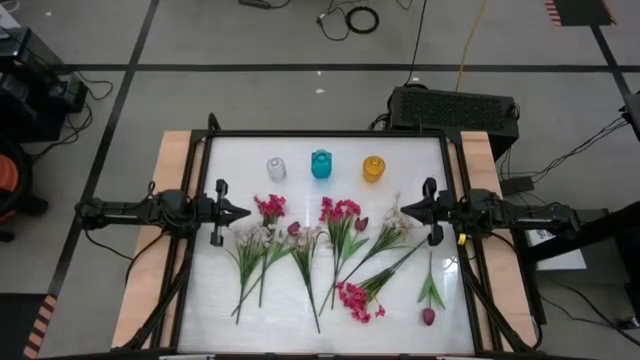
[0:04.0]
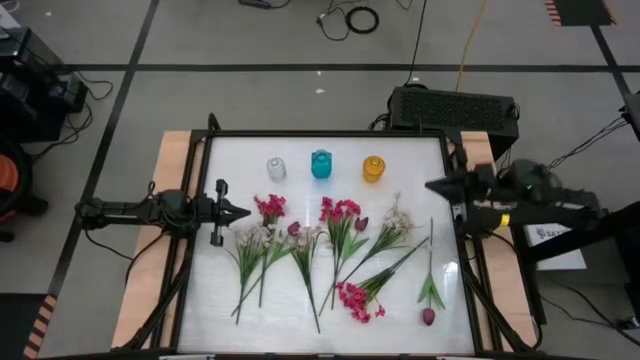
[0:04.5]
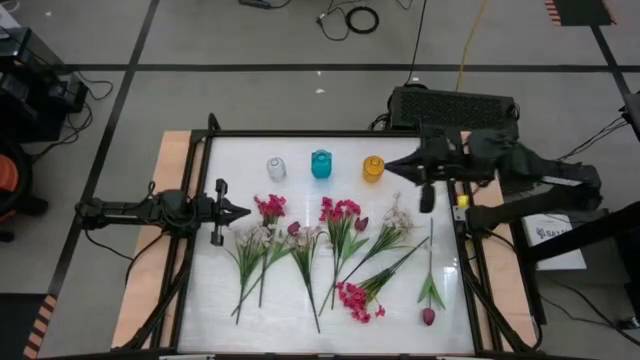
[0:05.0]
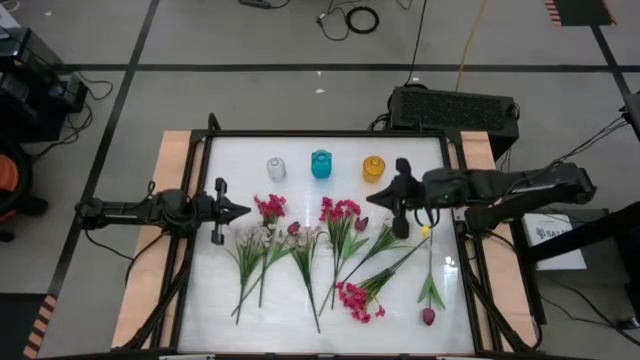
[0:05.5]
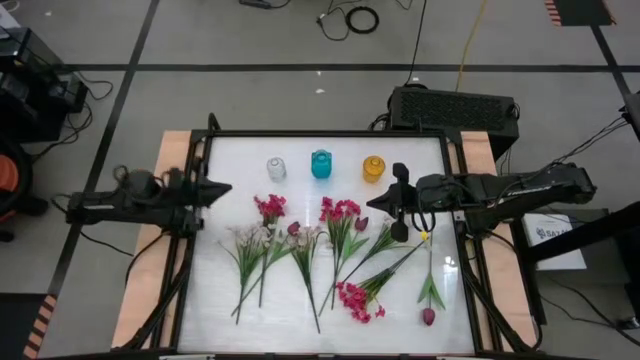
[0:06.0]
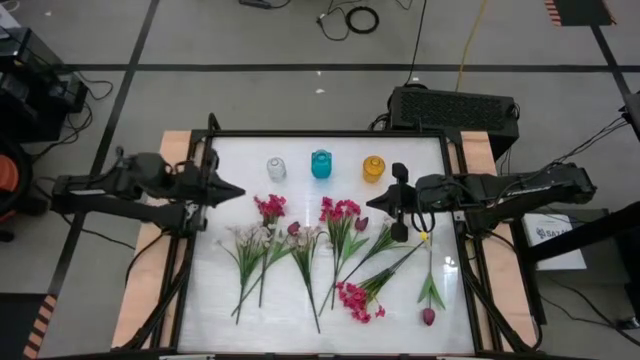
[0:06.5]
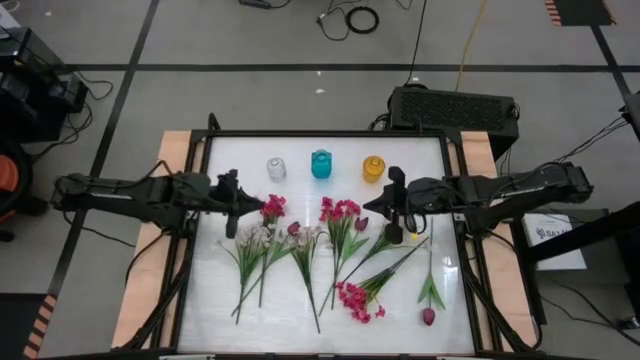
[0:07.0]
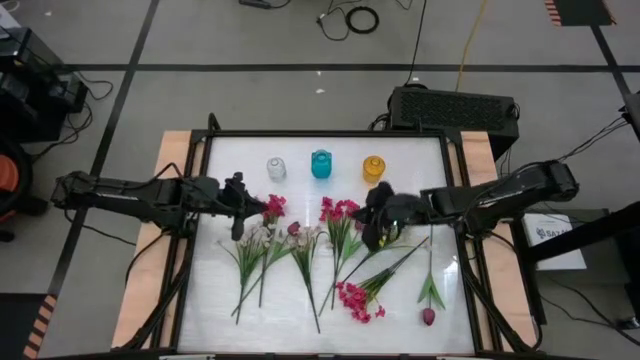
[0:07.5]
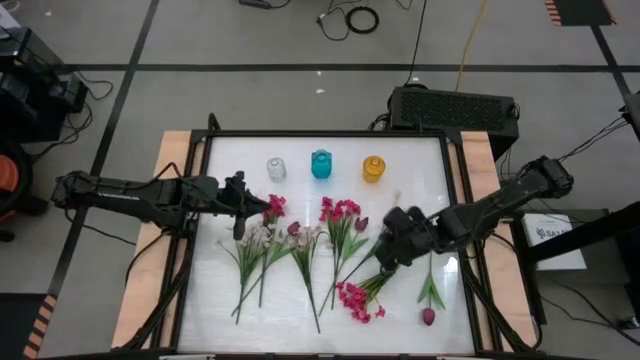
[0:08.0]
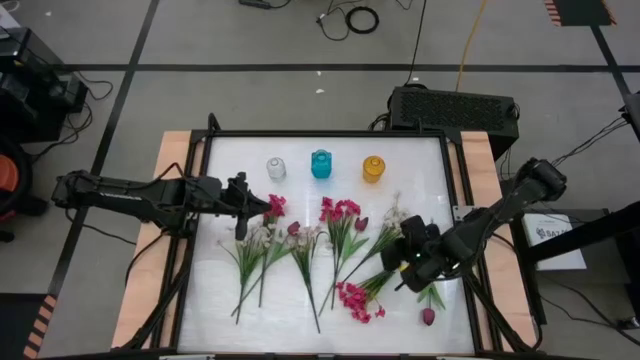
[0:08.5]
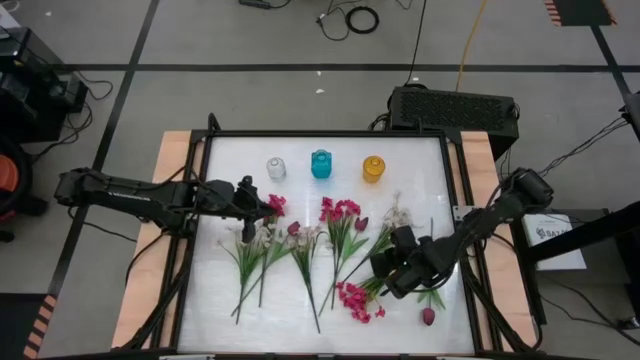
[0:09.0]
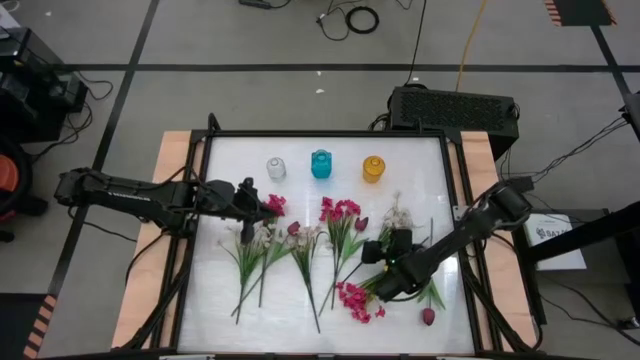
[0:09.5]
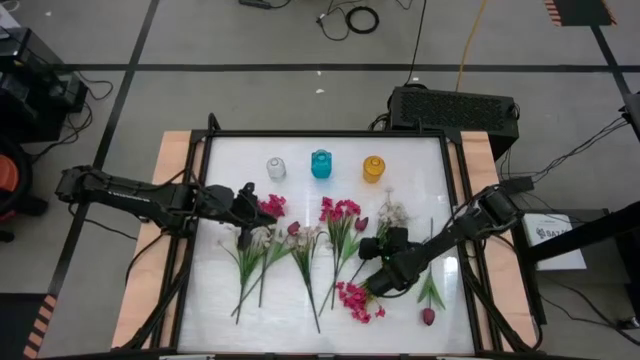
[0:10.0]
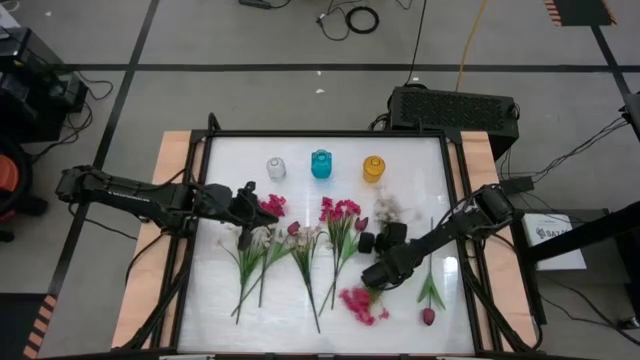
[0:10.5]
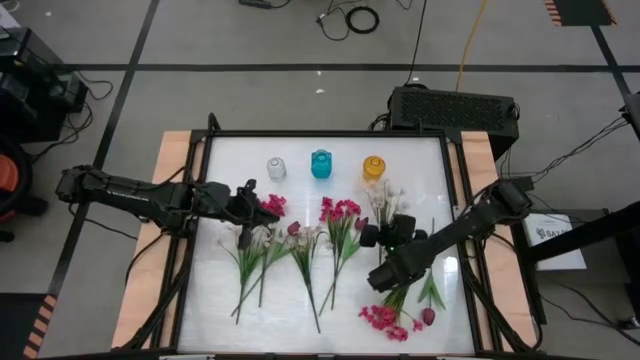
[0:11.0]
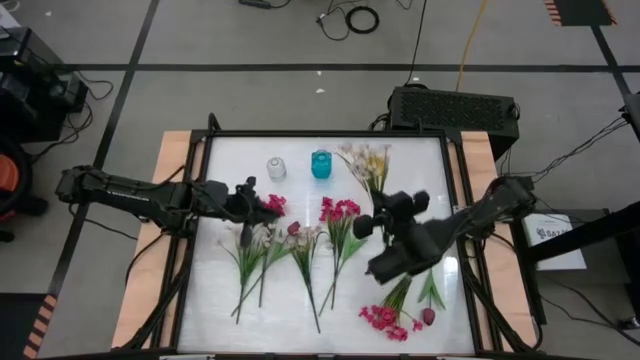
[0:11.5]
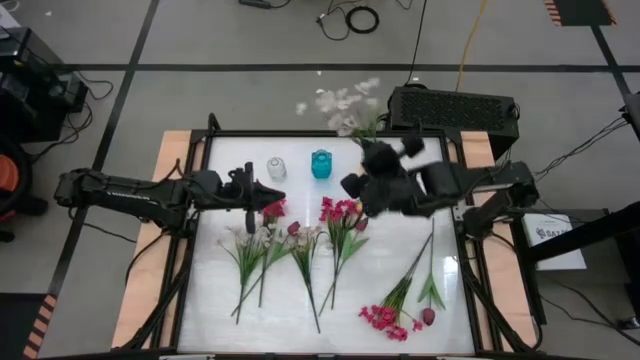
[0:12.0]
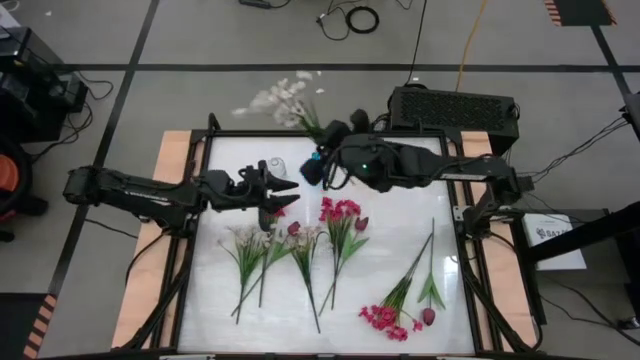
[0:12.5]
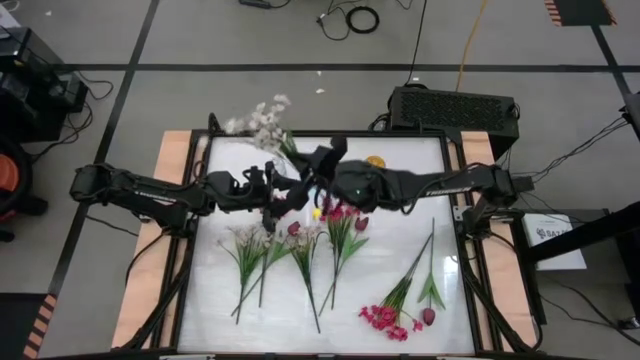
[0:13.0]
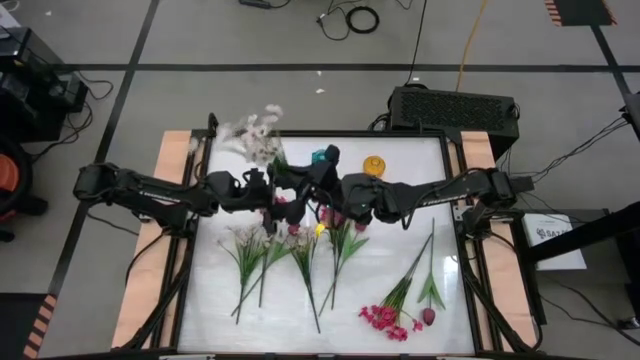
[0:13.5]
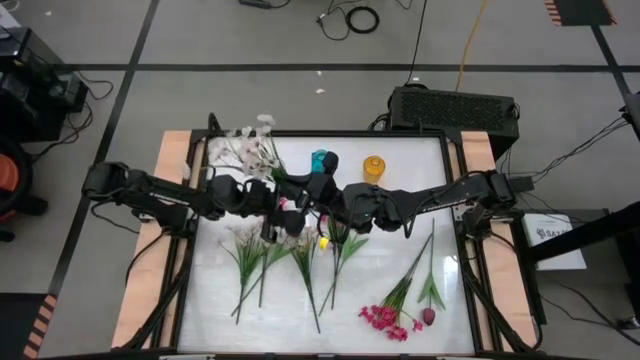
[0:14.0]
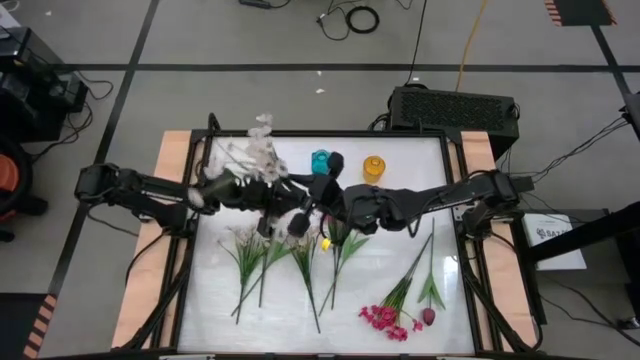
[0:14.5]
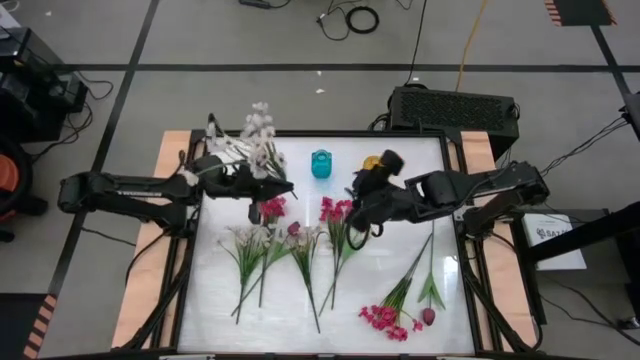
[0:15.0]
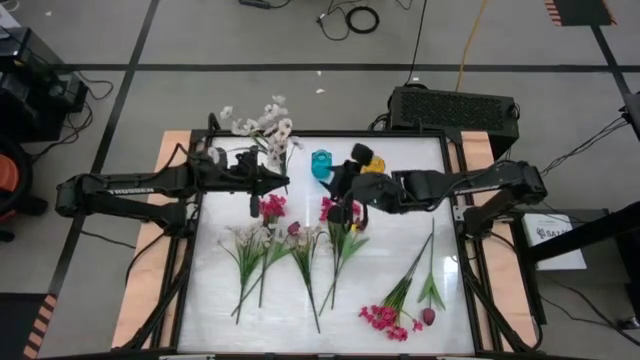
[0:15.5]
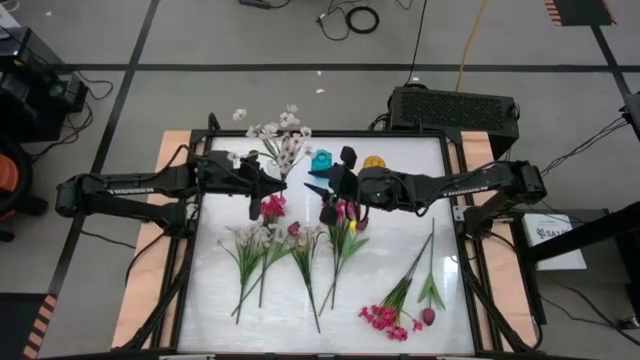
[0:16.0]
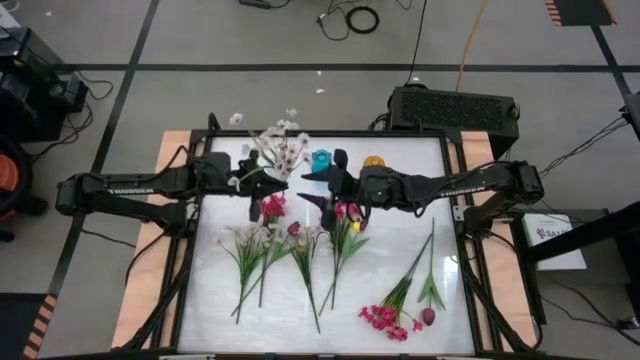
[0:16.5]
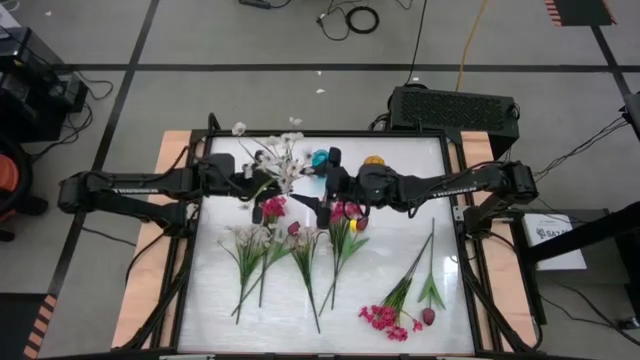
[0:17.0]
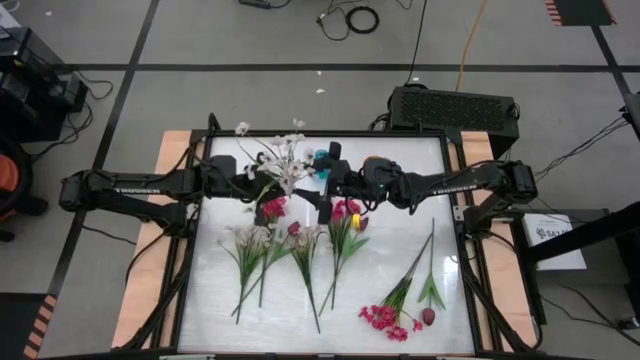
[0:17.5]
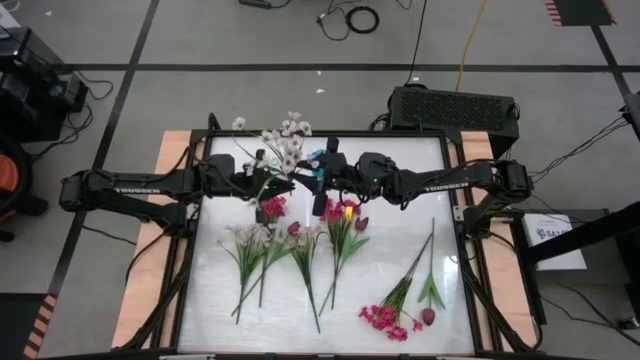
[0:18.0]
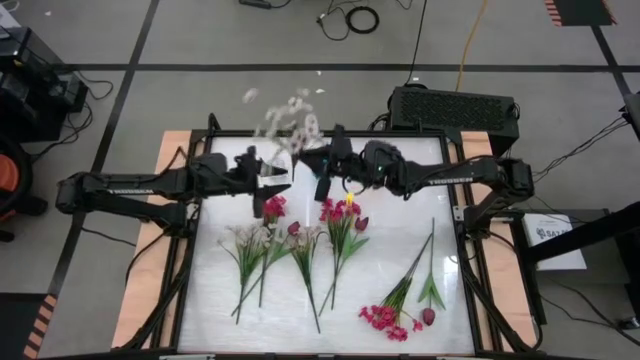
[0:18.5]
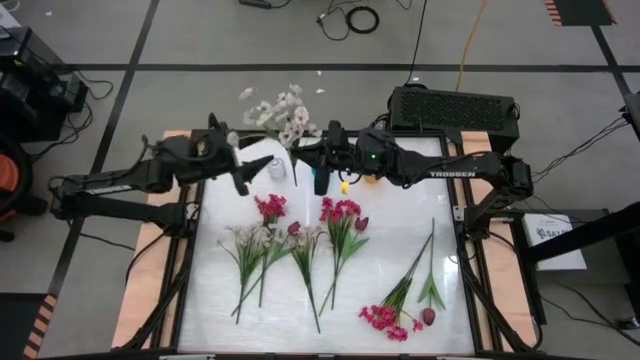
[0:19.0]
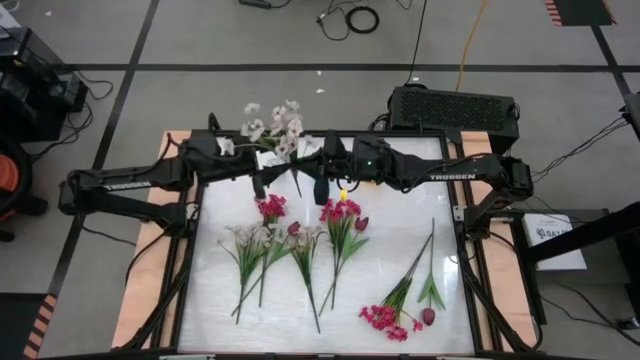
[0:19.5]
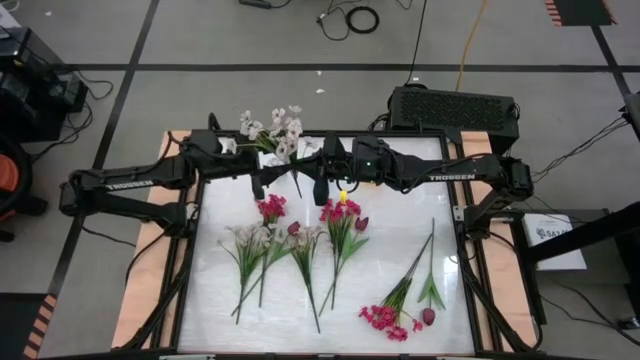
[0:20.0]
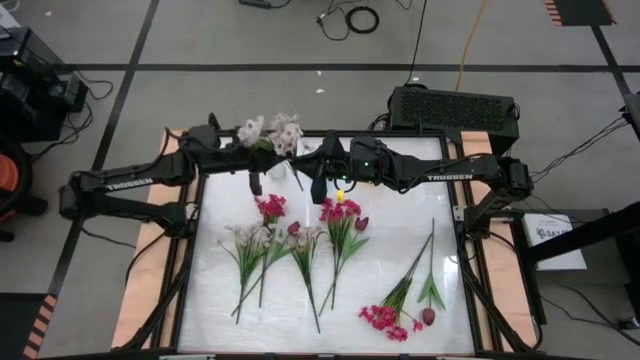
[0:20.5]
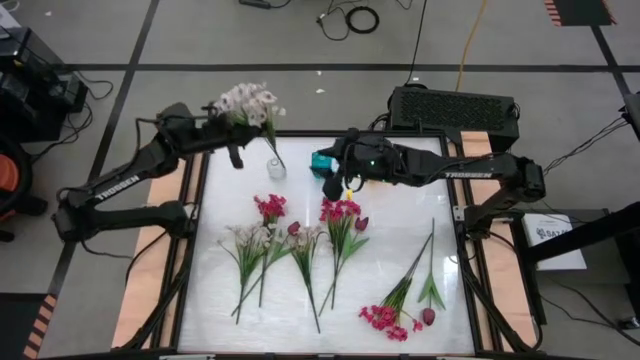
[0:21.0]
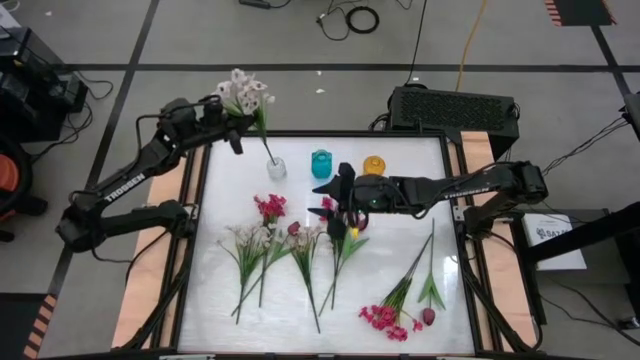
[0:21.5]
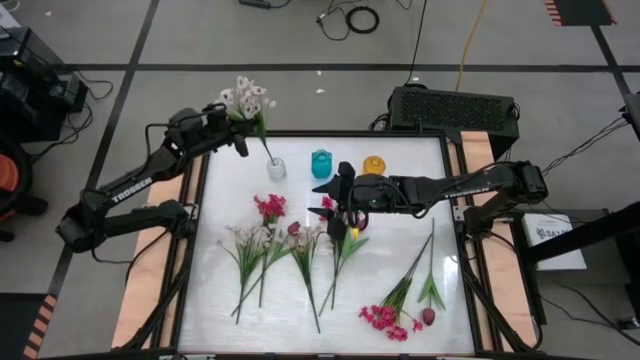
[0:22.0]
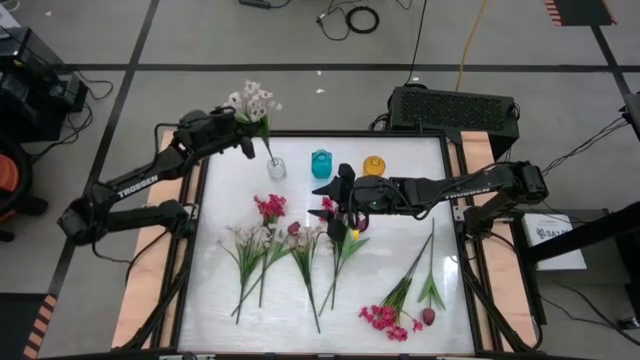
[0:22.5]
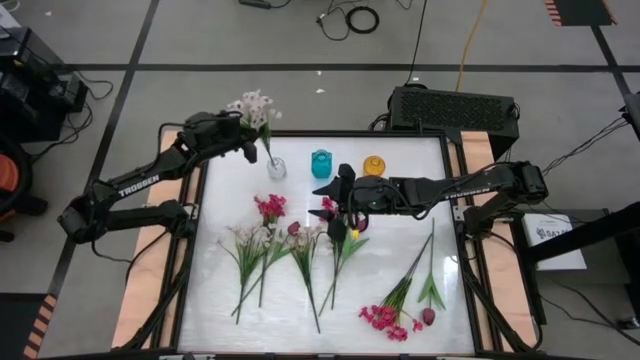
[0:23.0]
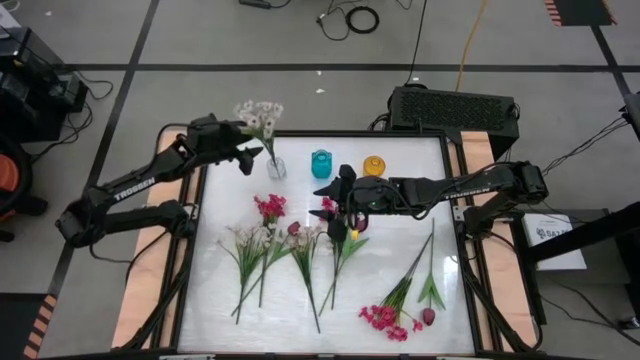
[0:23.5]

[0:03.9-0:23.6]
Task: Sort flowers into vase by color
Put the right white flowers into the transparent vase

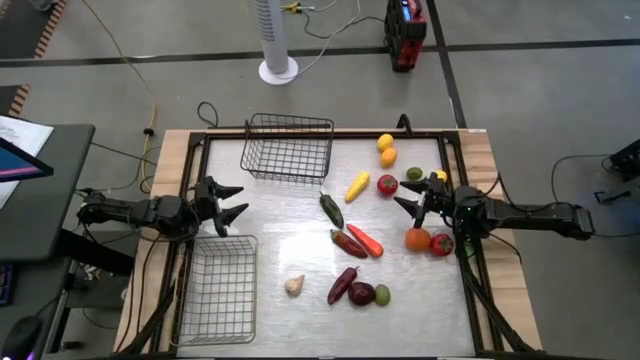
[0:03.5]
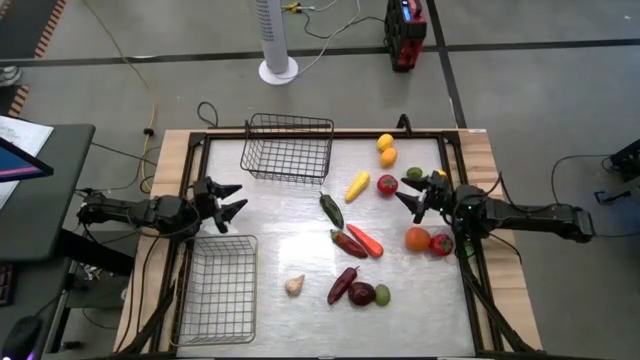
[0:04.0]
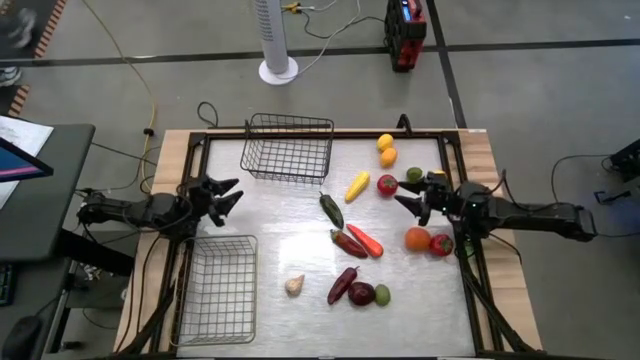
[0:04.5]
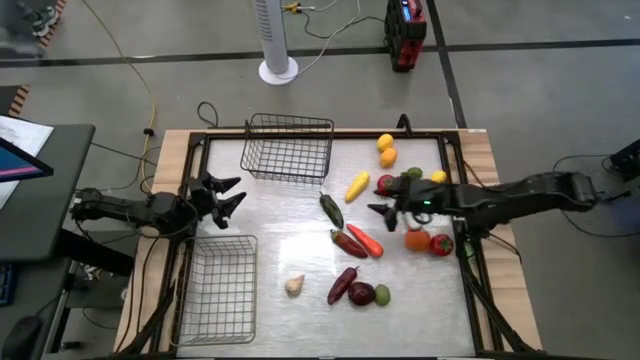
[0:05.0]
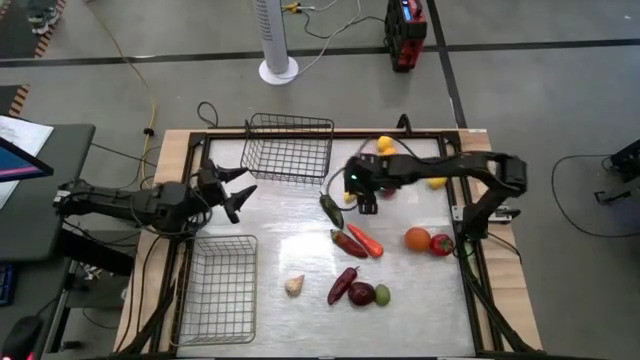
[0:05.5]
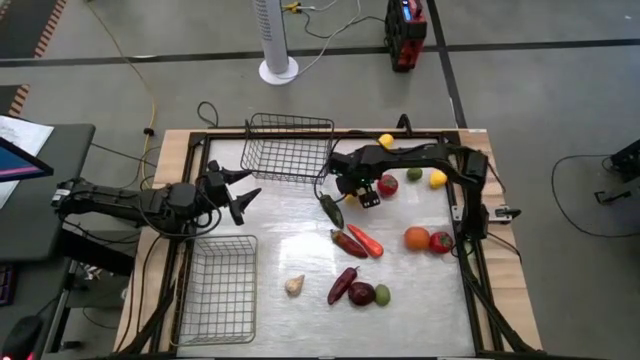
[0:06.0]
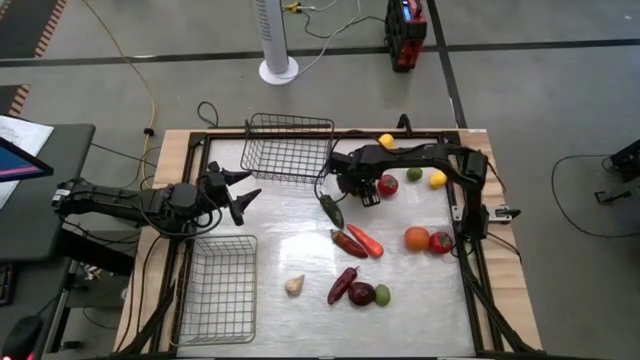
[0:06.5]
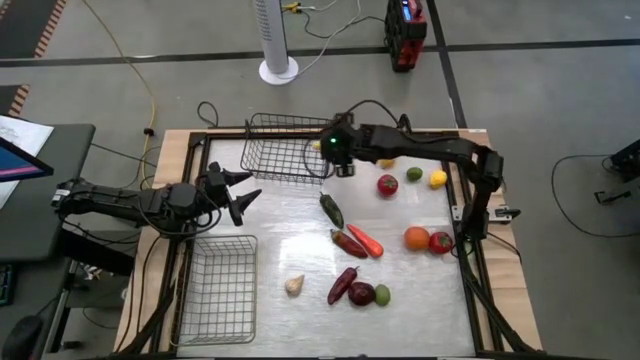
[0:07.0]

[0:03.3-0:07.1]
Task: Sort produce into baskets
Put the yellow corn into the black wire basket
